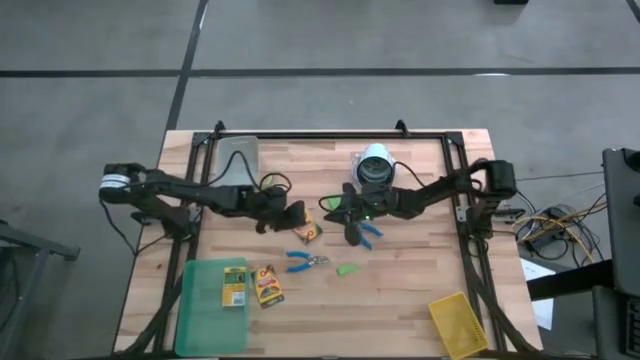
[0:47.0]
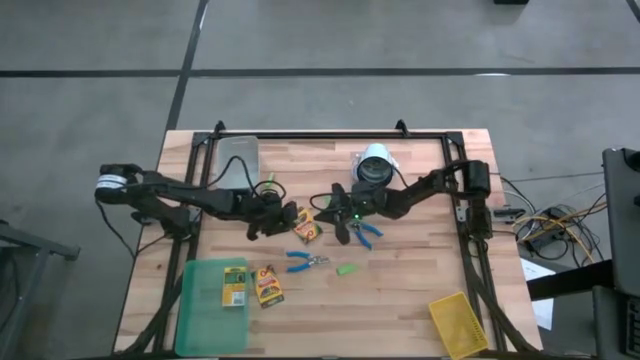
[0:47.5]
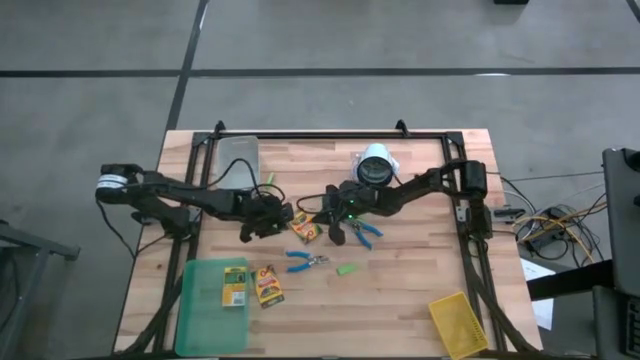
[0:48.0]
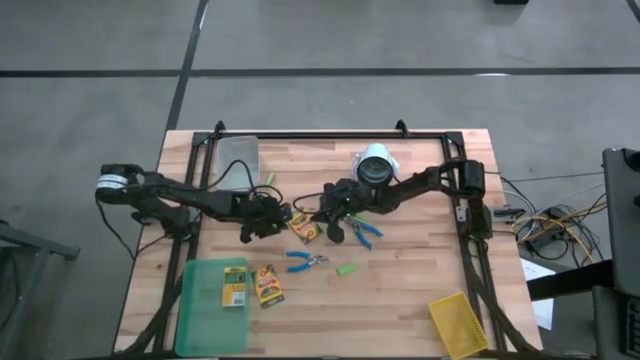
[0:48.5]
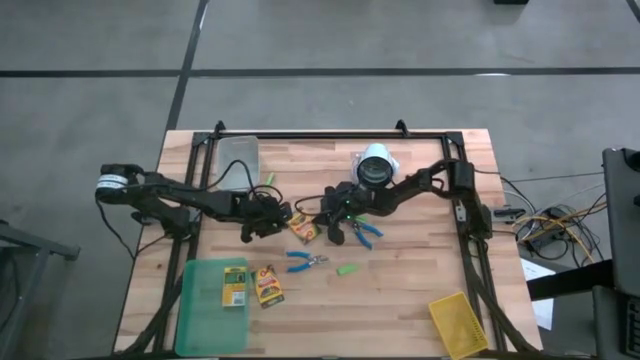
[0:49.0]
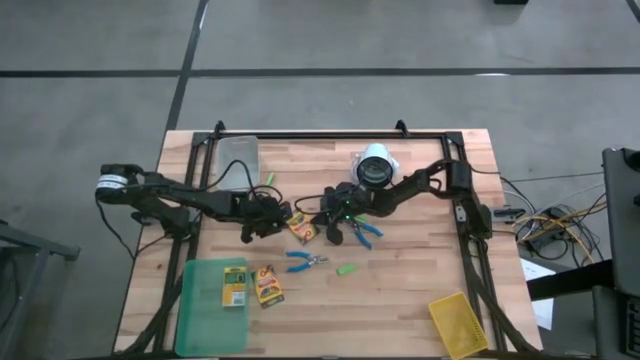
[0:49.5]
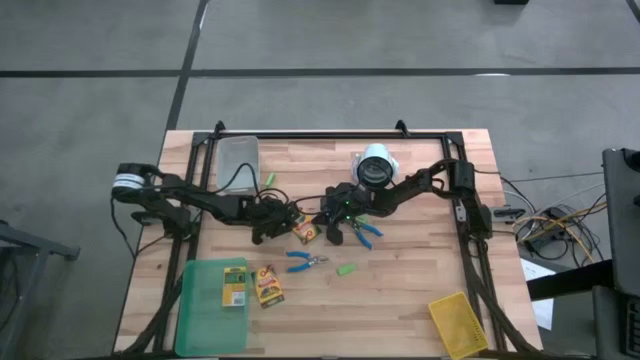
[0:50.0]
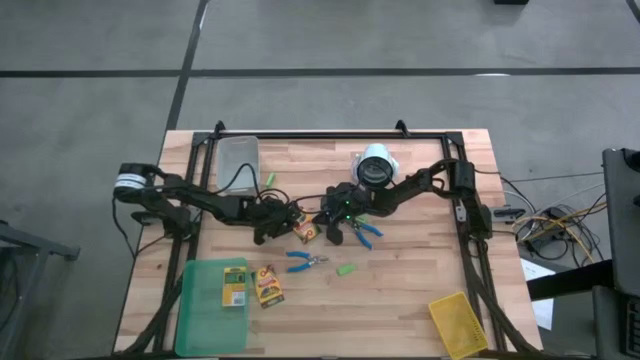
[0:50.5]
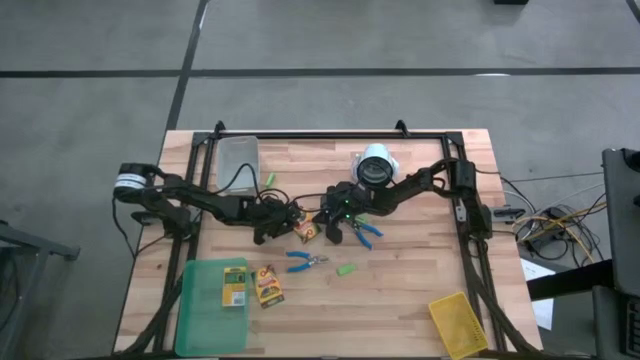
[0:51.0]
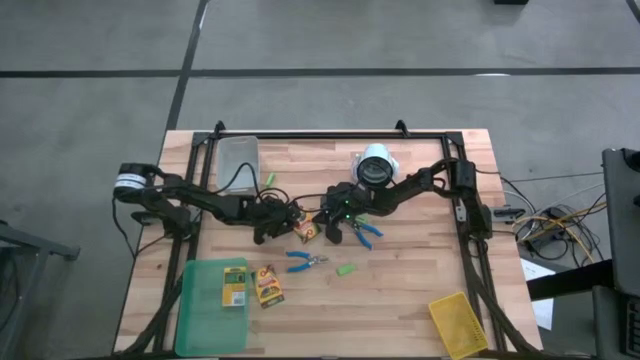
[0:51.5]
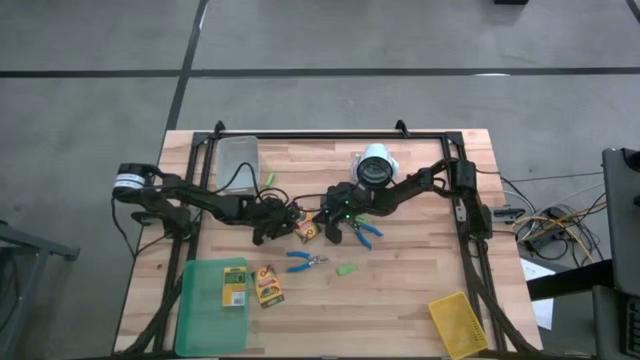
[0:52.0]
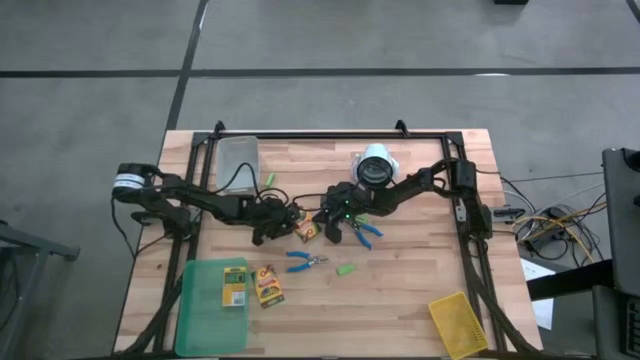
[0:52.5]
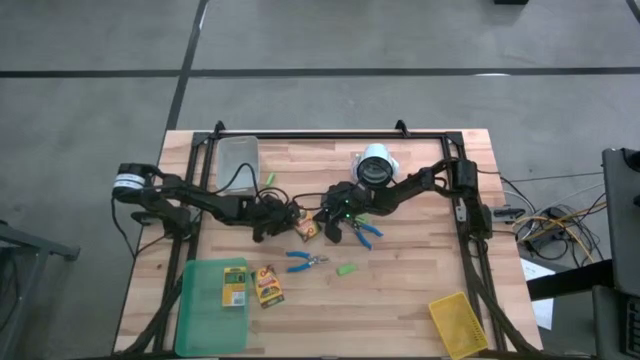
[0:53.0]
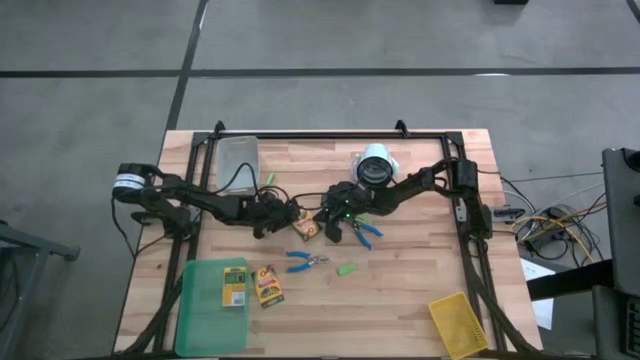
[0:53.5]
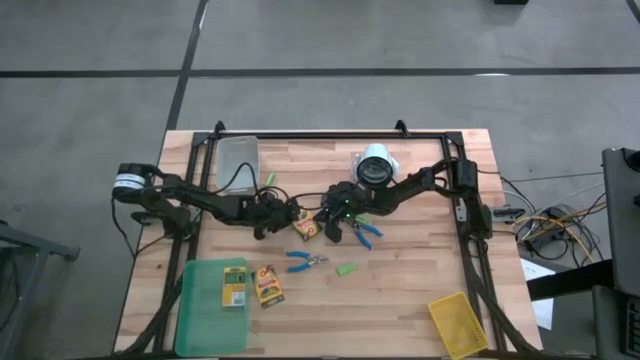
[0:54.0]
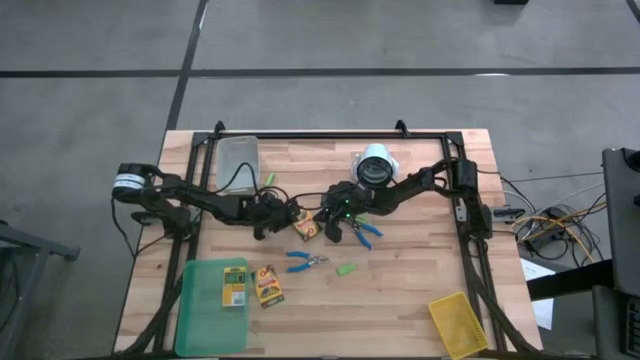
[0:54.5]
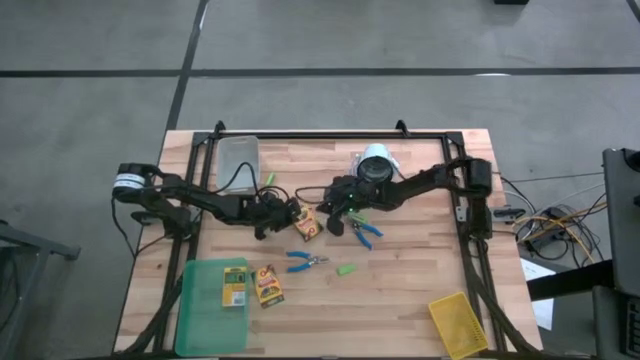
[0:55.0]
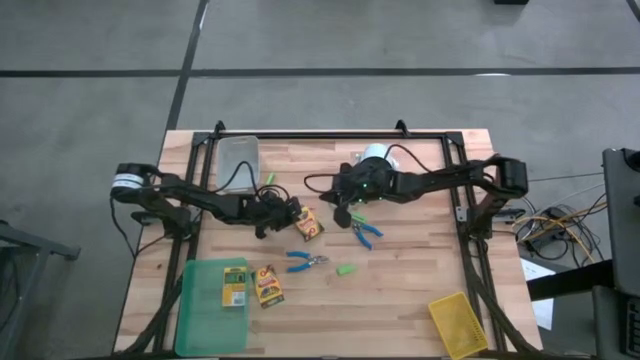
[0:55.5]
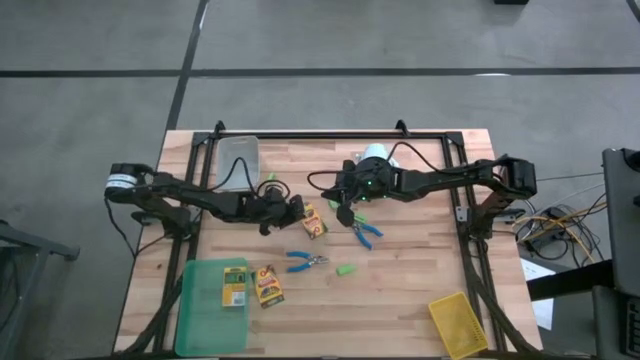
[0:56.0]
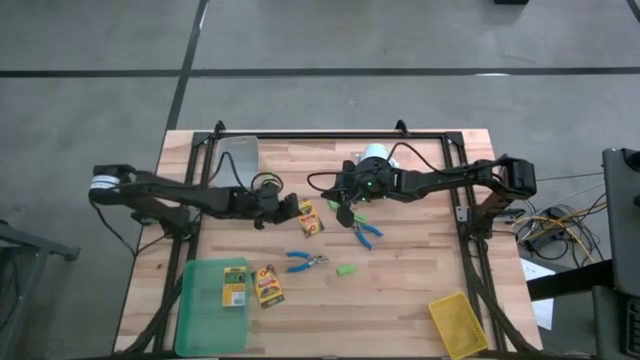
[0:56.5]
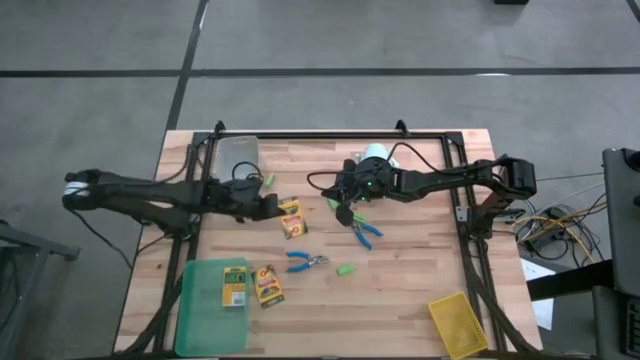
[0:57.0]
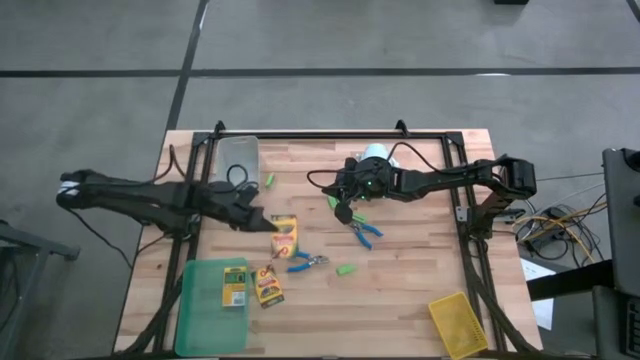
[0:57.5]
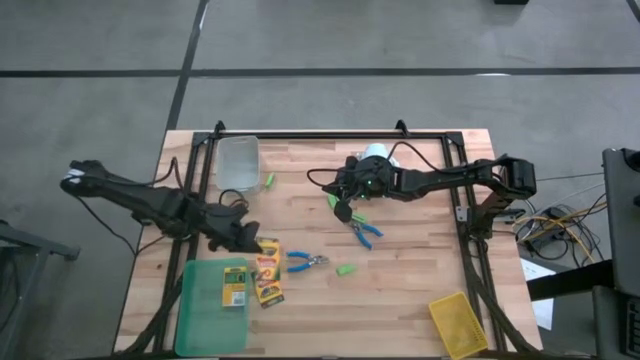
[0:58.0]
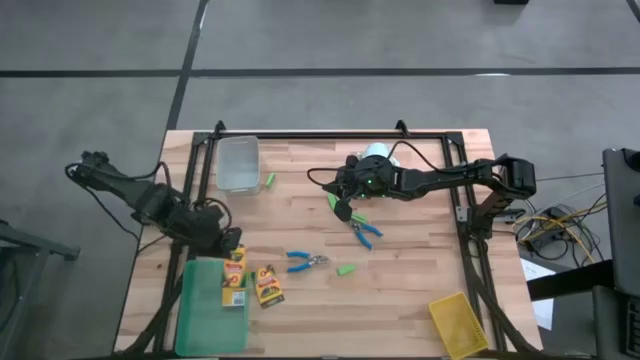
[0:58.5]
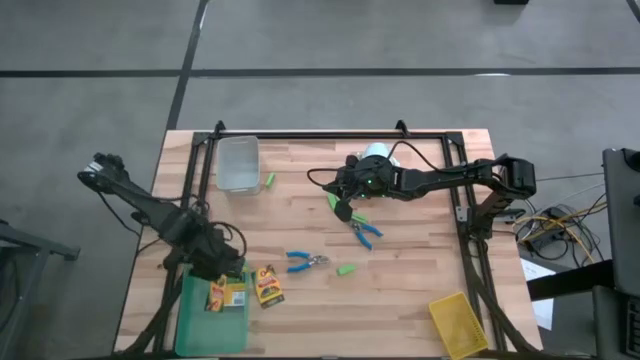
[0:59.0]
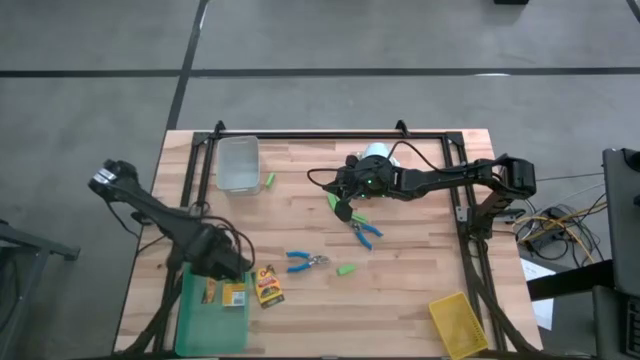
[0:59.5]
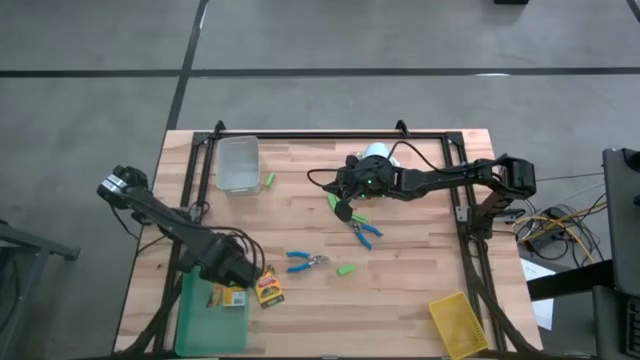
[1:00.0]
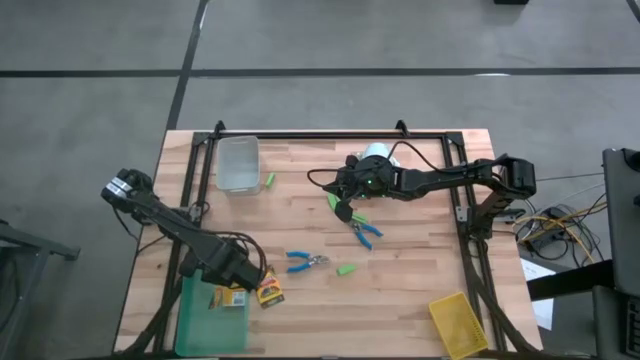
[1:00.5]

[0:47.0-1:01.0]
Task: Pick & Place School Supplies
Put the yellow crayon box into the green bin

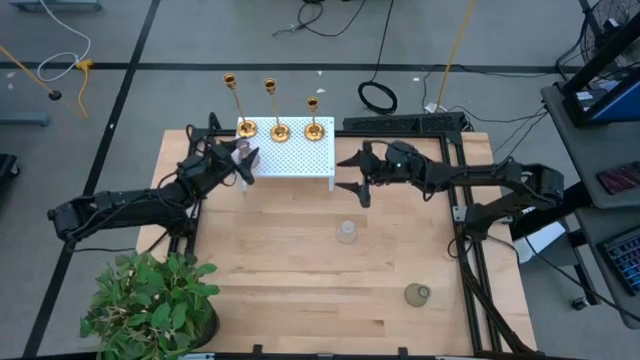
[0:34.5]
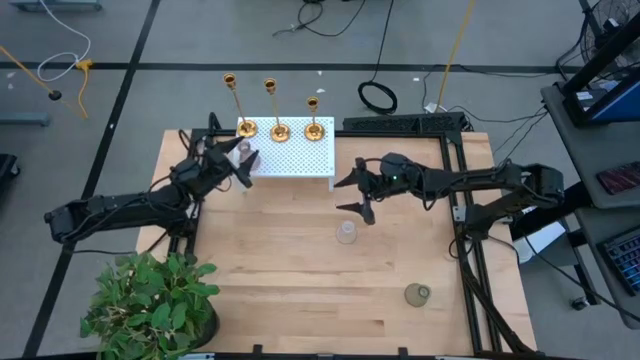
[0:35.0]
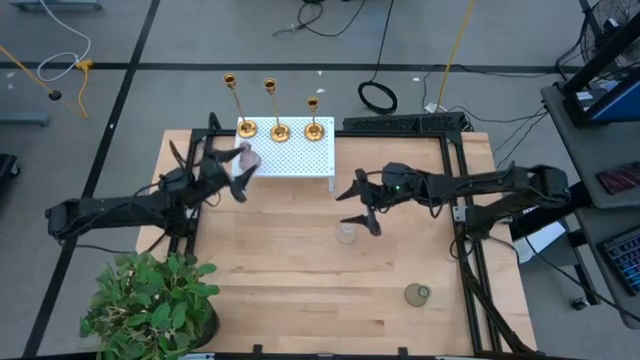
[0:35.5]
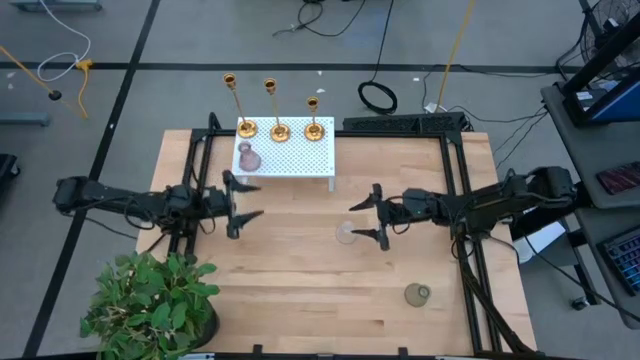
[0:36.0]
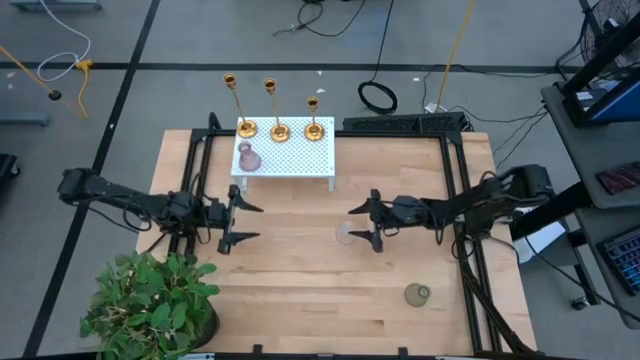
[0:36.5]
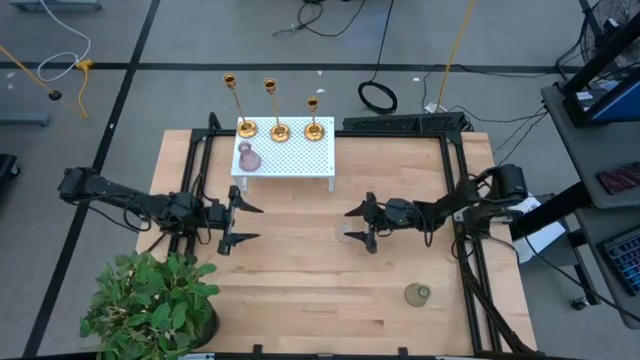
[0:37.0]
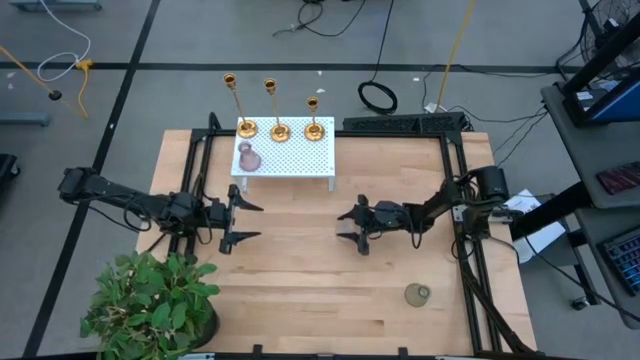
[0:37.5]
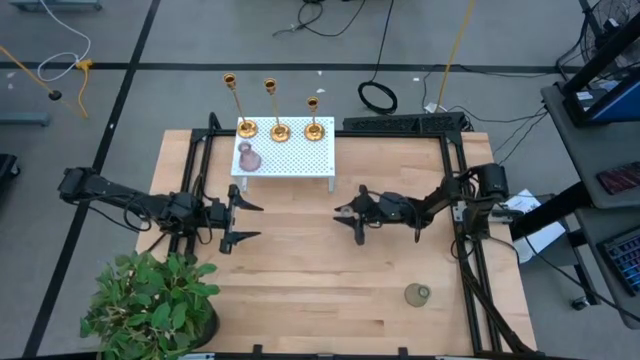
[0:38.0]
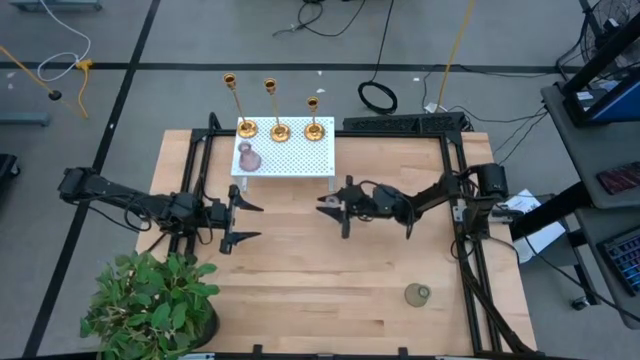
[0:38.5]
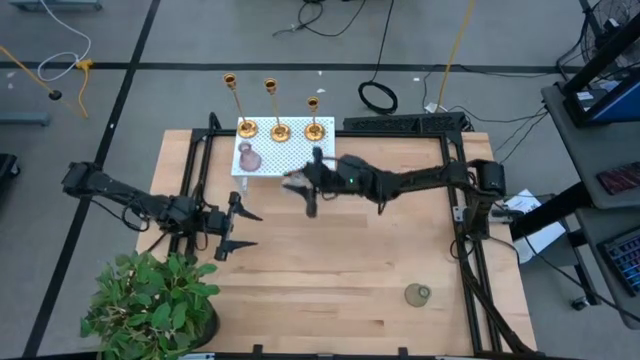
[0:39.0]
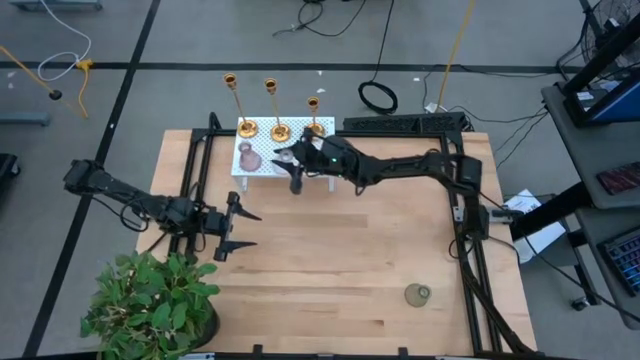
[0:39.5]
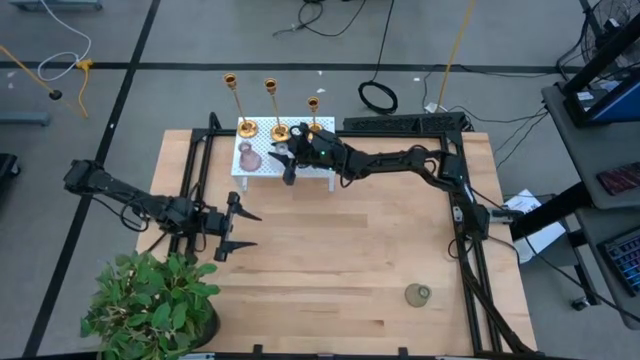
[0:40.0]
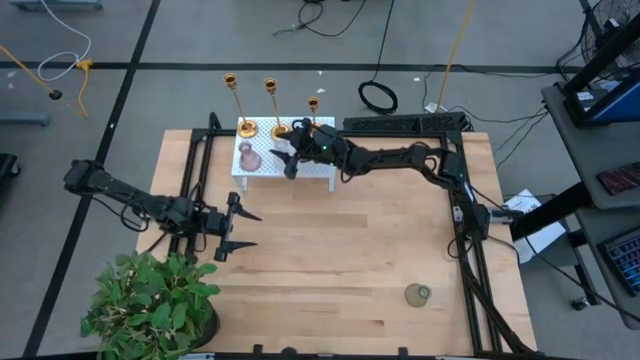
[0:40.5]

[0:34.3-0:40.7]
Task: Pick & Place candle stick holders
Put the transparent candle holder on the shelf

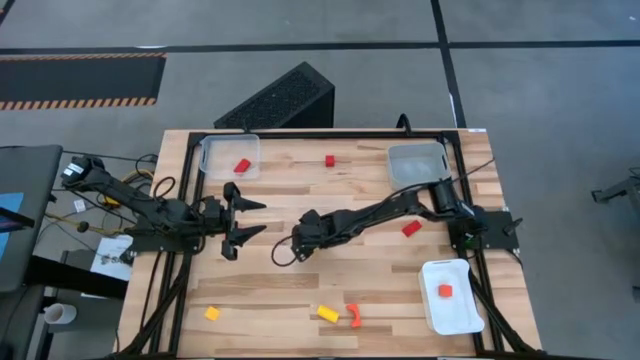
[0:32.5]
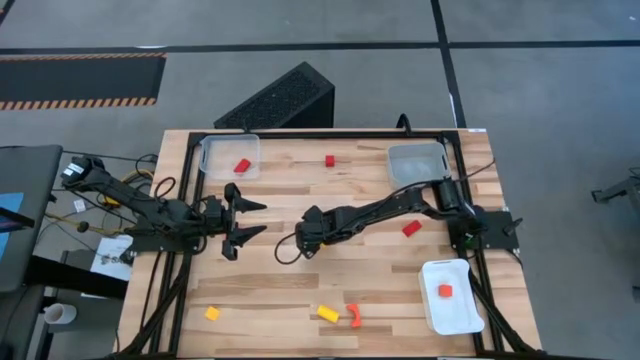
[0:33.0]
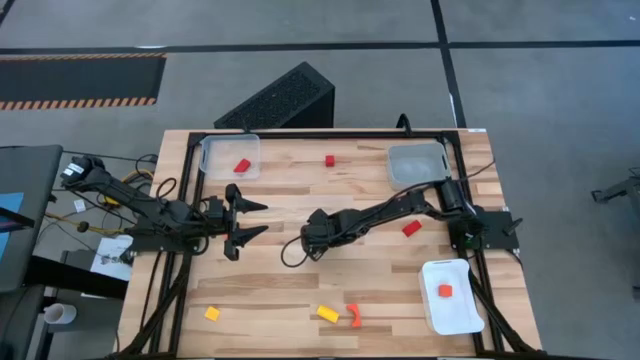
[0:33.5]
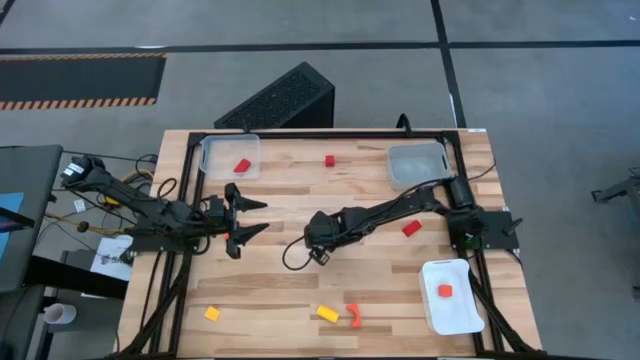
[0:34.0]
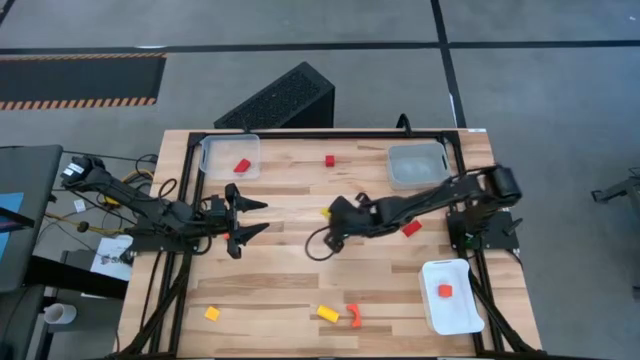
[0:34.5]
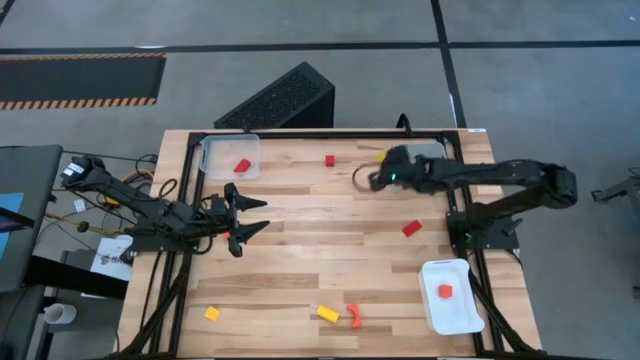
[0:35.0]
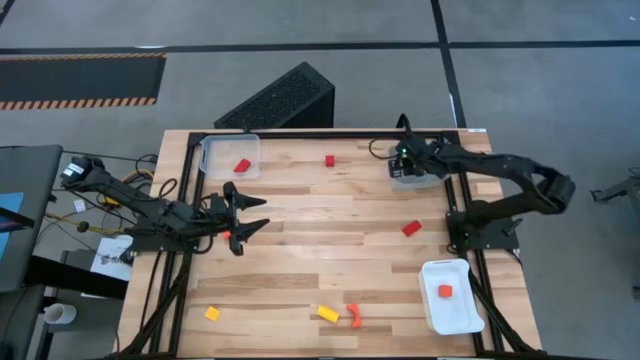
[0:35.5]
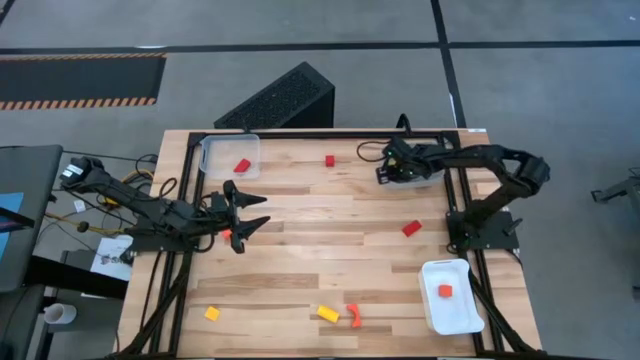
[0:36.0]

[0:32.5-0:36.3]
Task: Sort & place blocks by color
Put the top right yellow block into the gray bin
